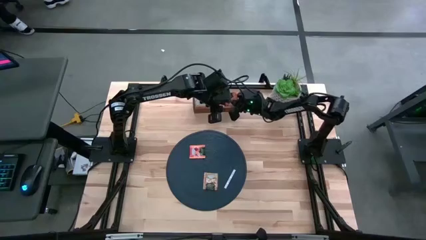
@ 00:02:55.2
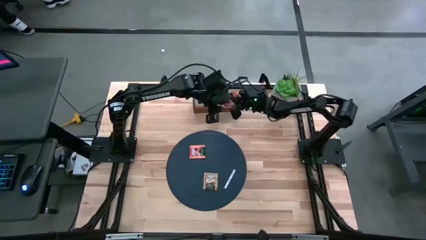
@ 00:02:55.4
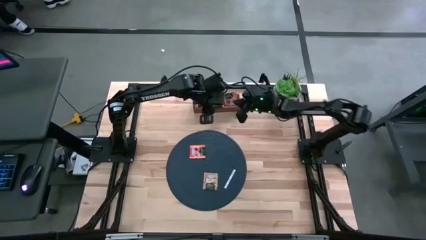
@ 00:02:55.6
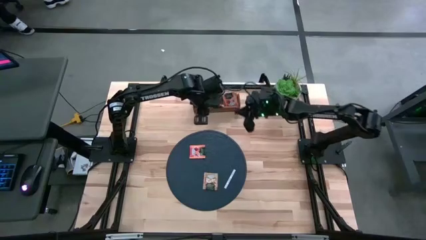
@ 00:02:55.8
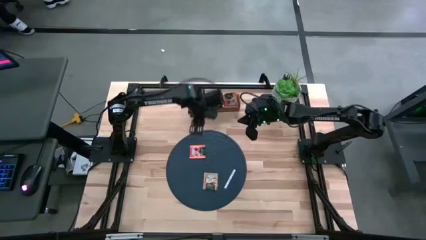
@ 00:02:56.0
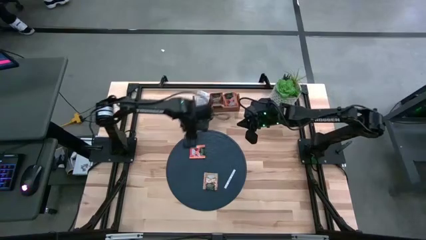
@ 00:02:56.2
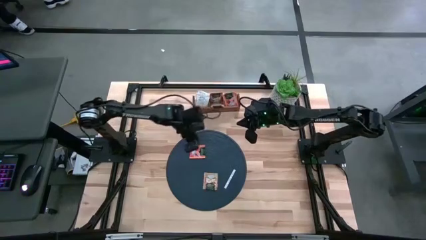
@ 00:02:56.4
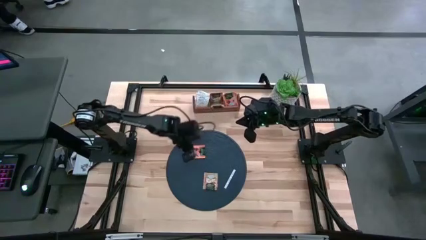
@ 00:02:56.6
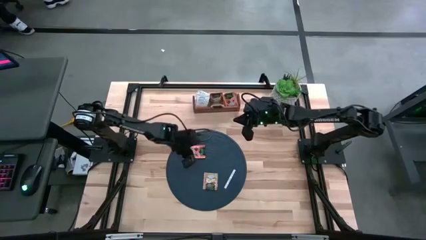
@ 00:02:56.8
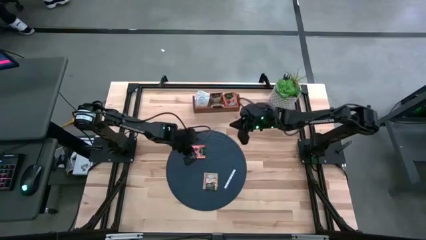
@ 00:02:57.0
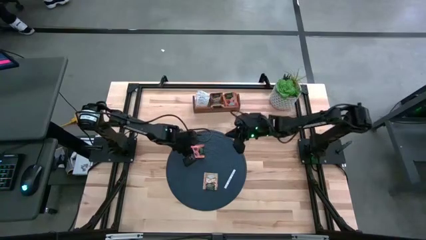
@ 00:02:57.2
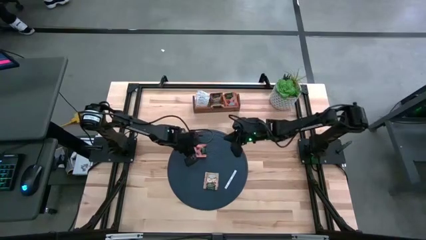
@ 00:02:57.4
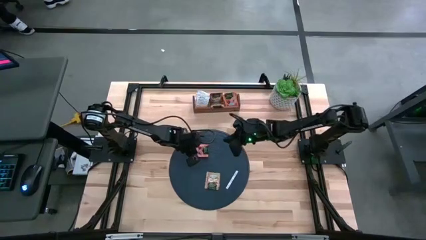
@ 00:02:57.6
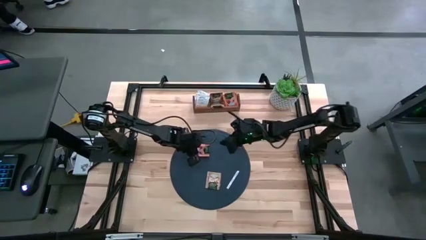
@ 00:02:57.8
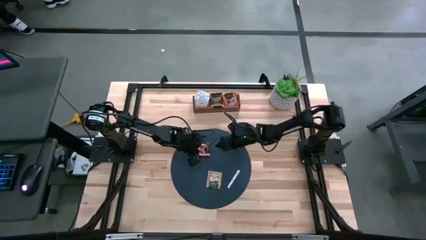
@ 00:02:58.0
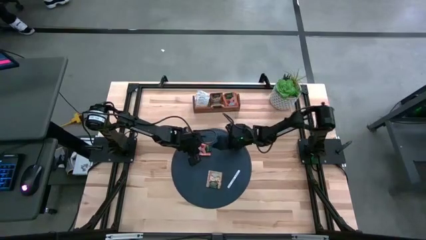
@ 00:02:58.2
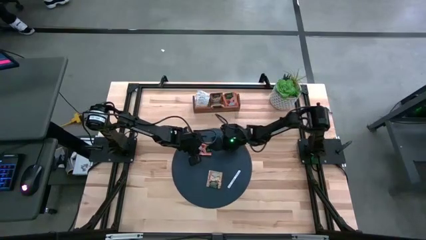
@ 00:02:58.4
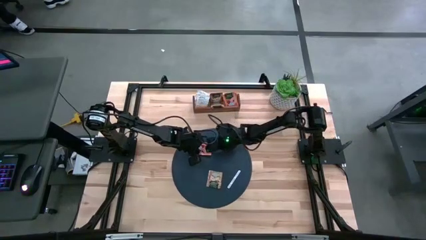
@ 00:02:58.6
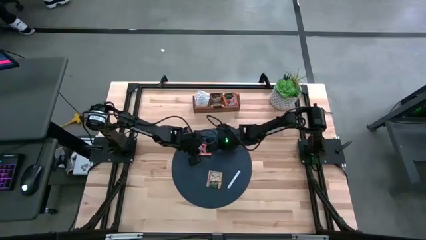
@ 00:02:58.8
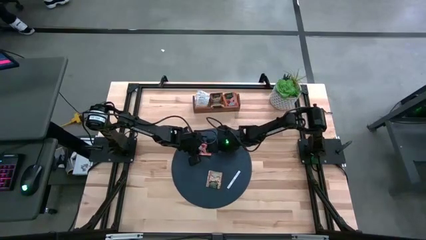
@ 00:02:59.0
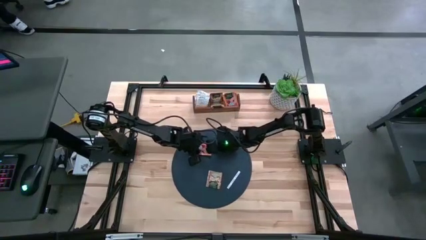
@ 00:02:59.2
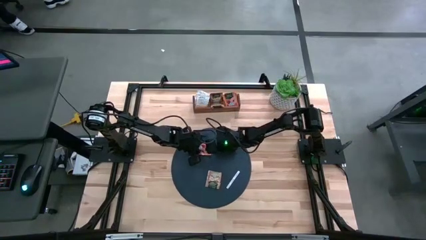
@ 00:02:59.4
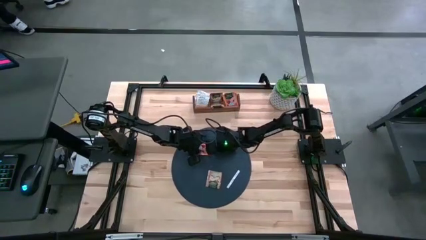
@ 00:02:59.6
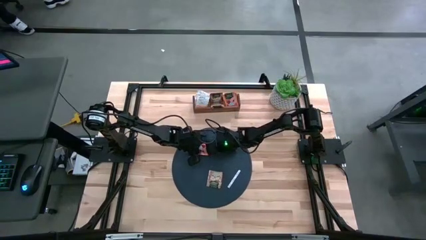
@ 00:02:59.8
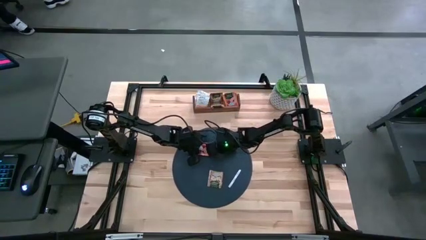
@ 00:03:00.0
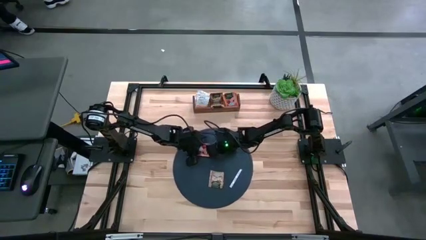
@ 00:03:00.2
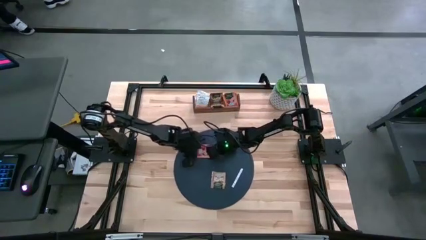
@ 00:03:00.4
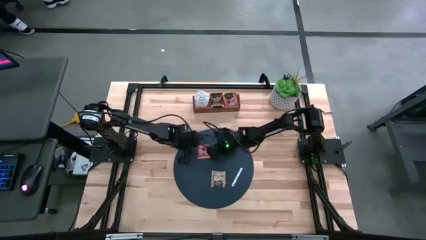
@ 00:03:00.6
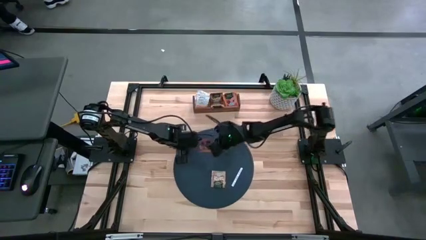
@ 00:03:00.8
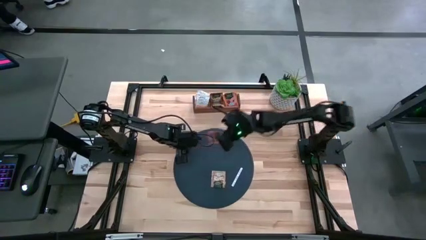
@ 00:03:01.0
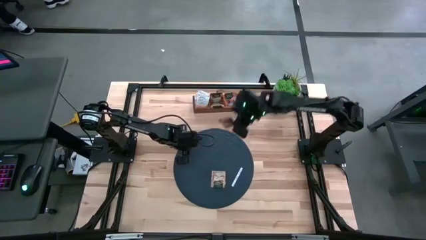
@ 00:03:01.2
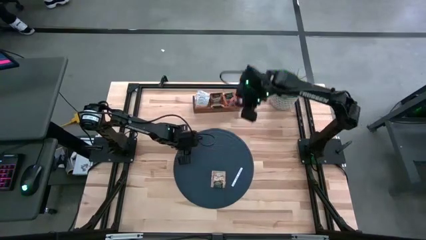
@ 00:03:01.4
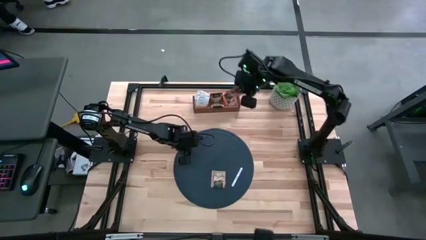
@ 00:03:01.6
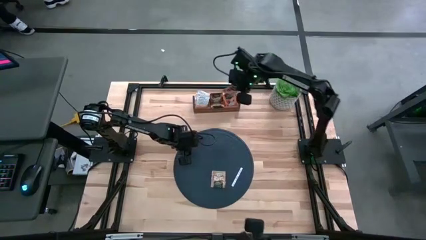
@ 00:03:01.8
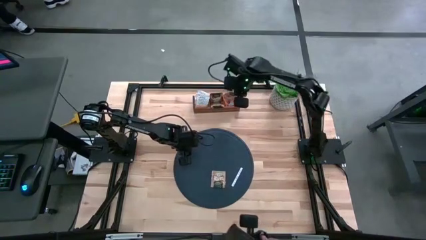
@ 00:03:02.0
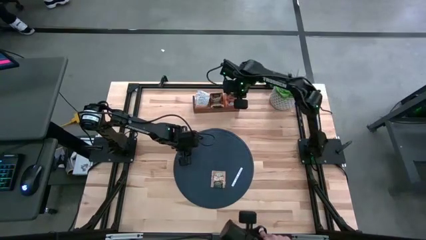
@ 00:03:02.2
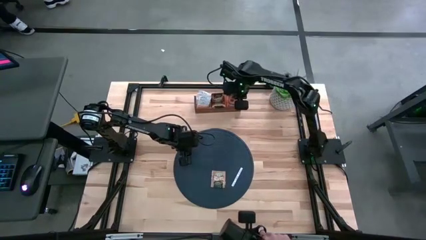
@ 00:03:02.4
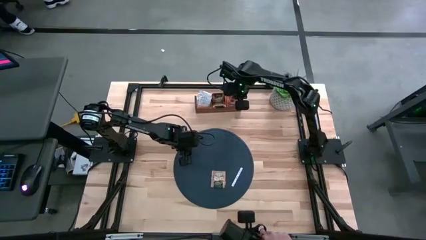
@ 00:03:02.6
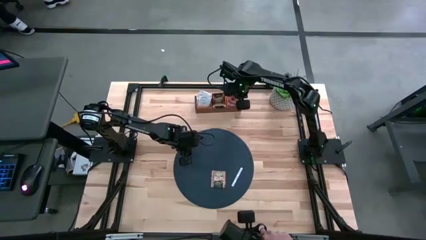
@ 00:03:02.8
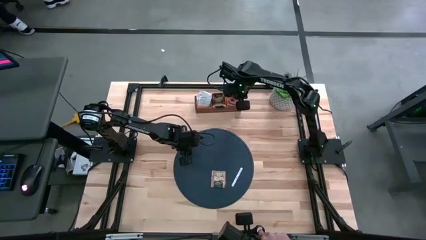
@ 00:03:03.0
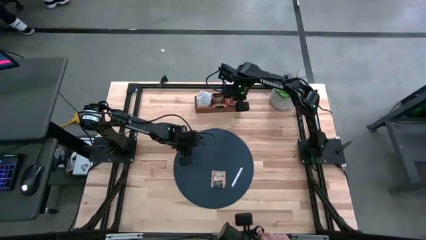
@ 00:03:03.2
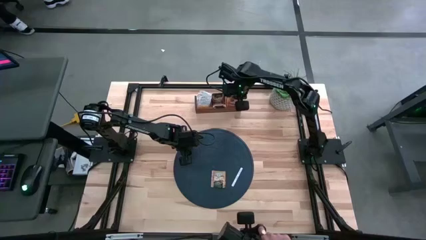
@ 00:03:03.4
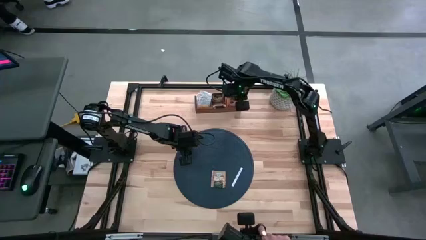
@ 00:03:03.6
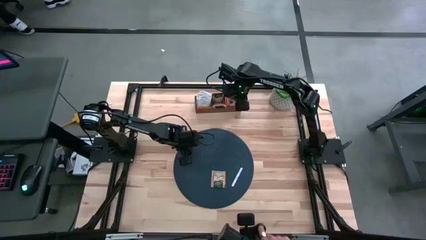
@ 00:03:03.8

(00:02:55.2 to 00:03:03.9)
Task: Pick & Place Tea
Put the orange tea bag into the right section of the wooden organizer

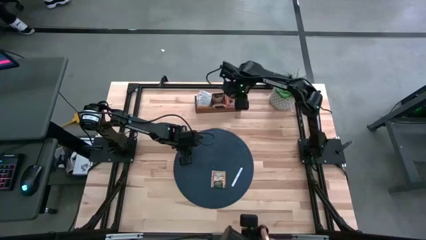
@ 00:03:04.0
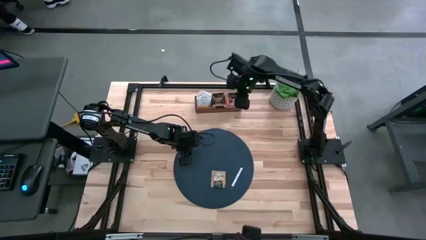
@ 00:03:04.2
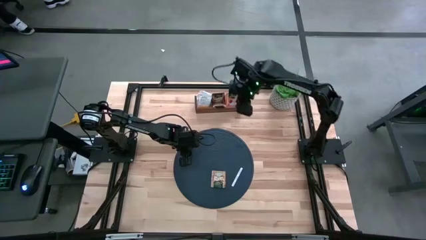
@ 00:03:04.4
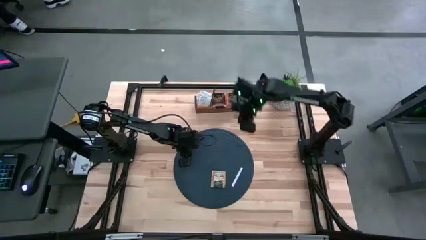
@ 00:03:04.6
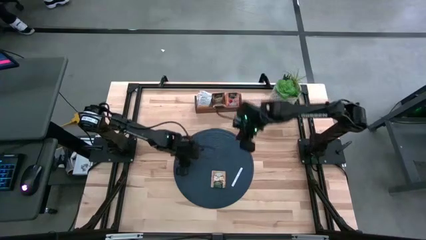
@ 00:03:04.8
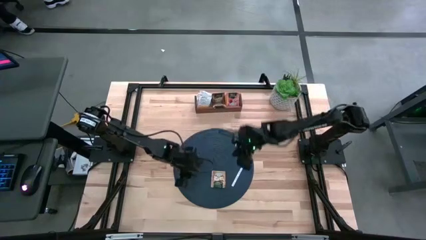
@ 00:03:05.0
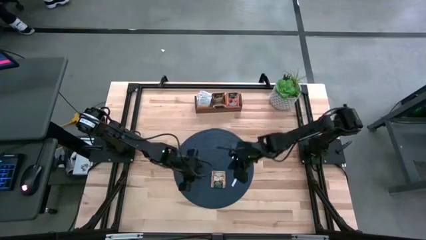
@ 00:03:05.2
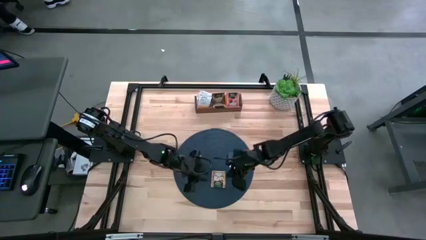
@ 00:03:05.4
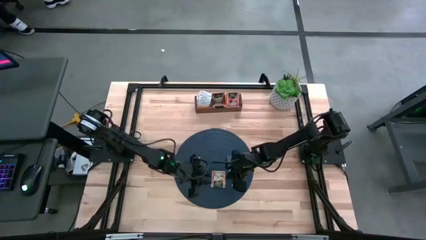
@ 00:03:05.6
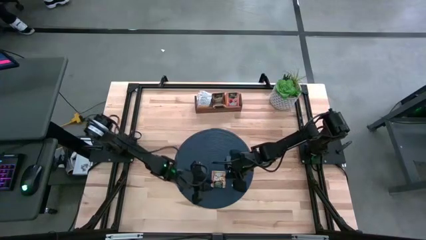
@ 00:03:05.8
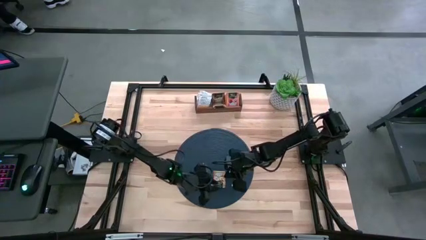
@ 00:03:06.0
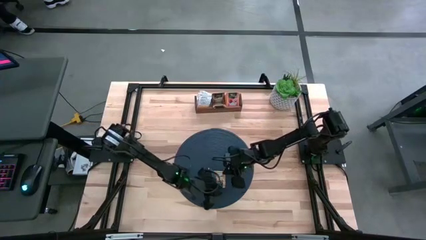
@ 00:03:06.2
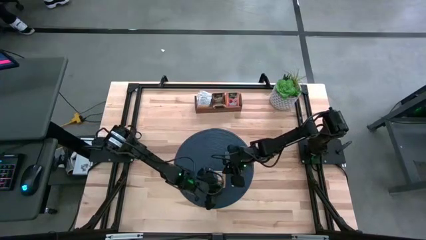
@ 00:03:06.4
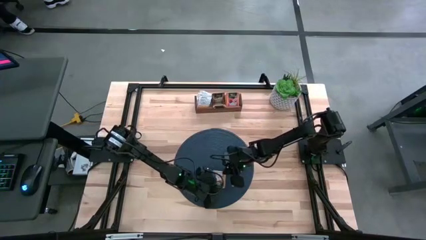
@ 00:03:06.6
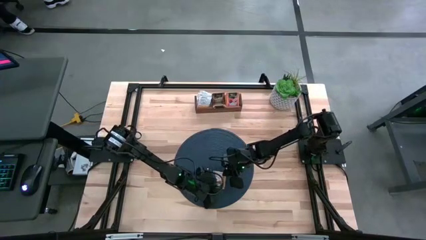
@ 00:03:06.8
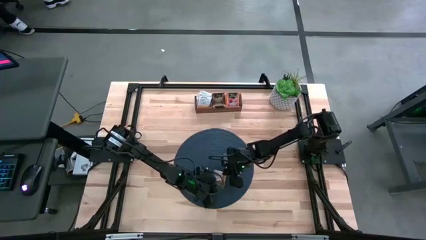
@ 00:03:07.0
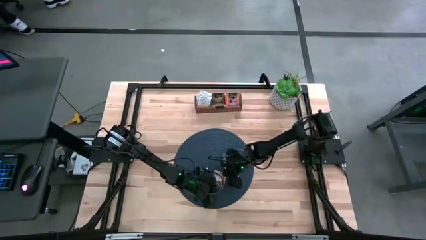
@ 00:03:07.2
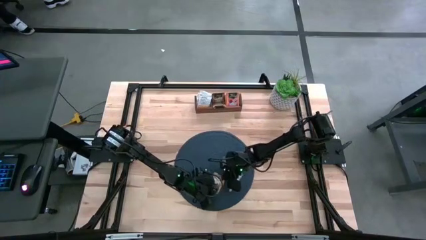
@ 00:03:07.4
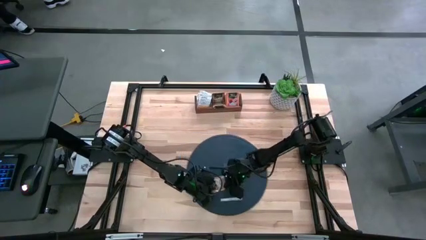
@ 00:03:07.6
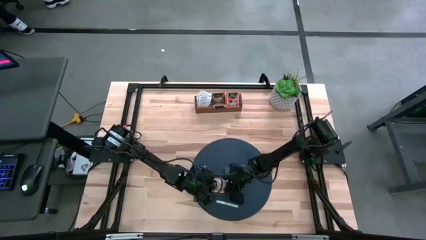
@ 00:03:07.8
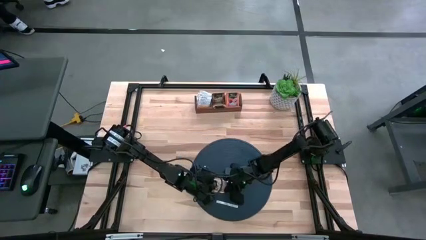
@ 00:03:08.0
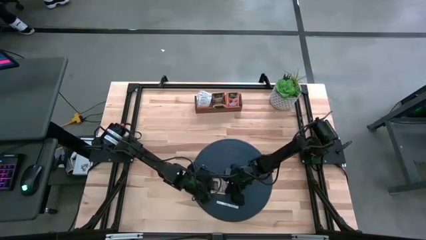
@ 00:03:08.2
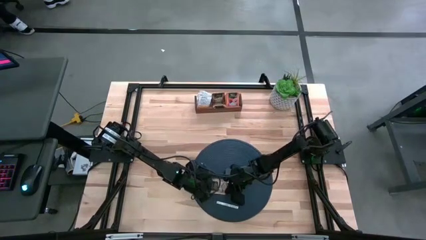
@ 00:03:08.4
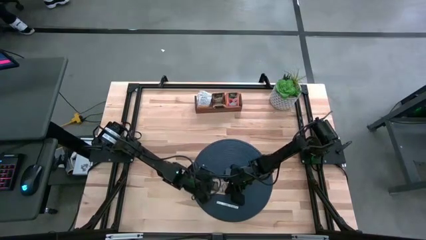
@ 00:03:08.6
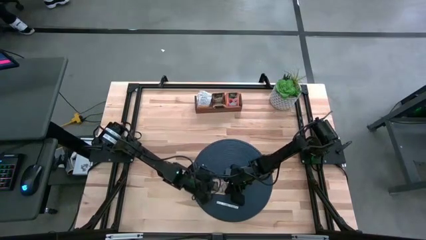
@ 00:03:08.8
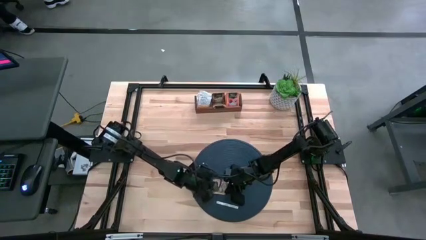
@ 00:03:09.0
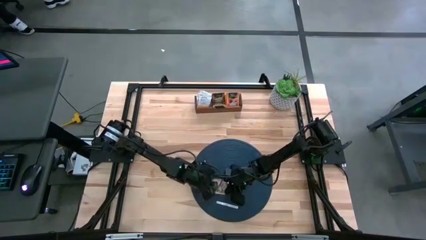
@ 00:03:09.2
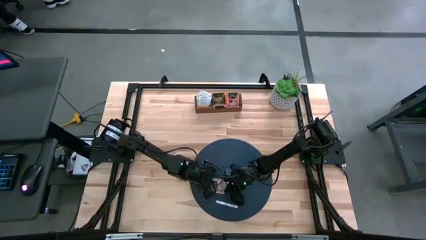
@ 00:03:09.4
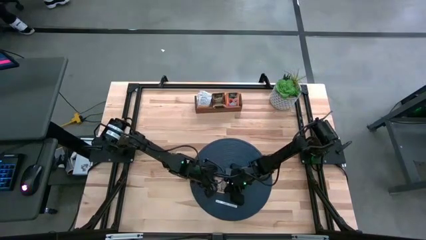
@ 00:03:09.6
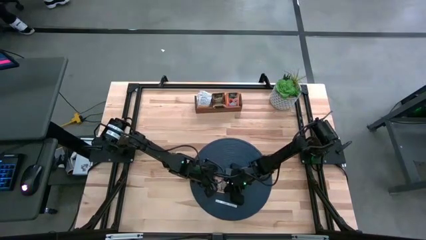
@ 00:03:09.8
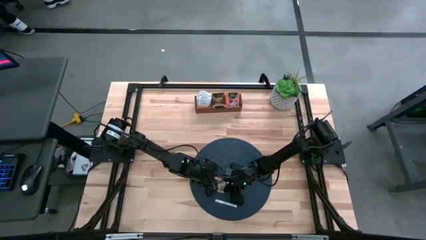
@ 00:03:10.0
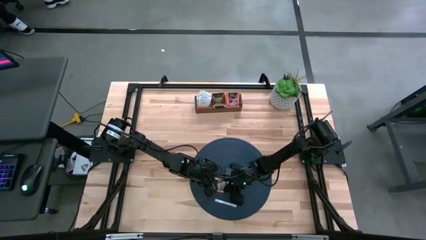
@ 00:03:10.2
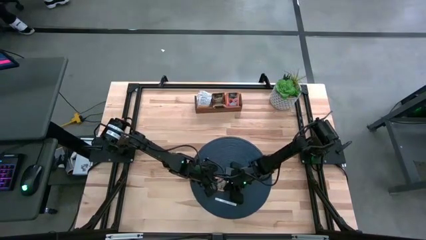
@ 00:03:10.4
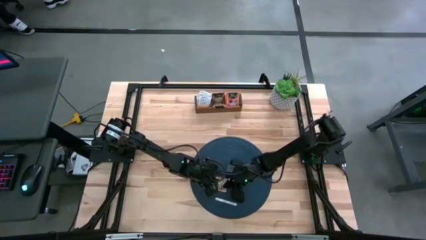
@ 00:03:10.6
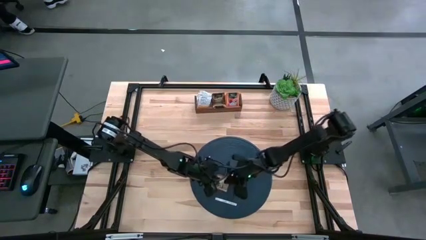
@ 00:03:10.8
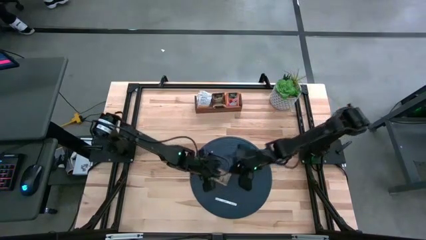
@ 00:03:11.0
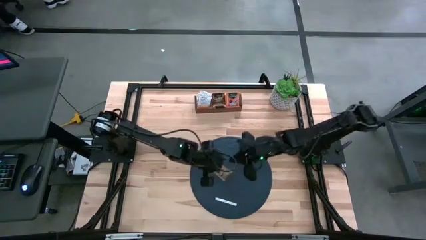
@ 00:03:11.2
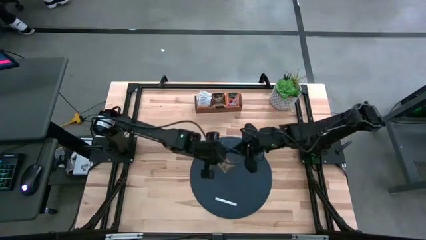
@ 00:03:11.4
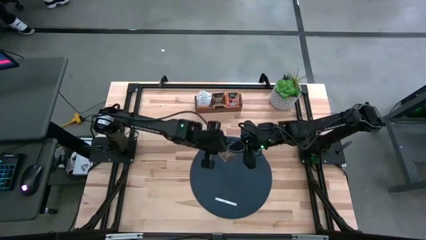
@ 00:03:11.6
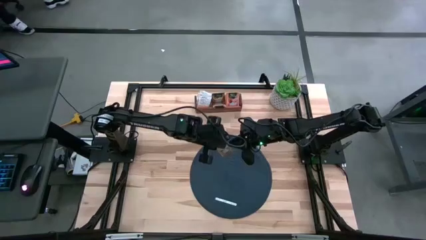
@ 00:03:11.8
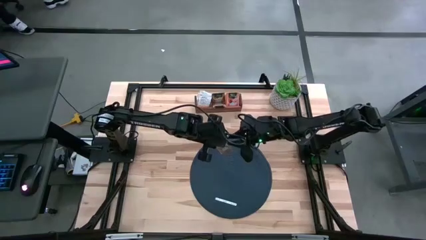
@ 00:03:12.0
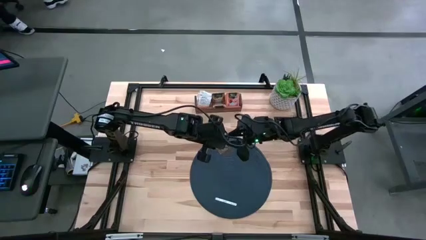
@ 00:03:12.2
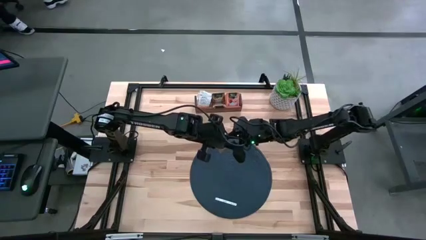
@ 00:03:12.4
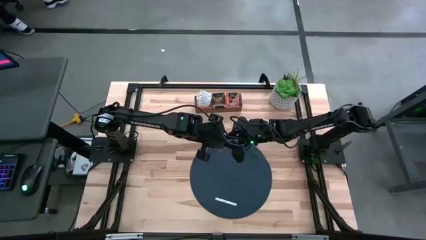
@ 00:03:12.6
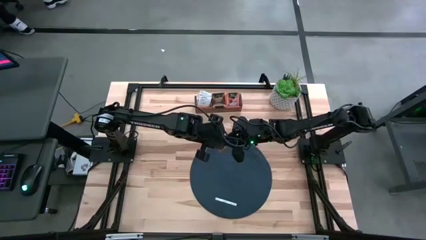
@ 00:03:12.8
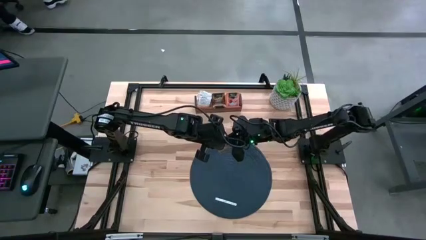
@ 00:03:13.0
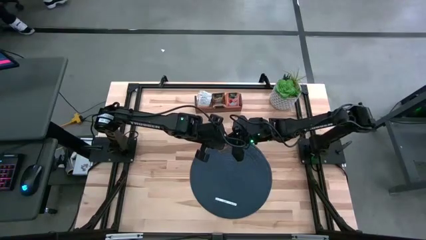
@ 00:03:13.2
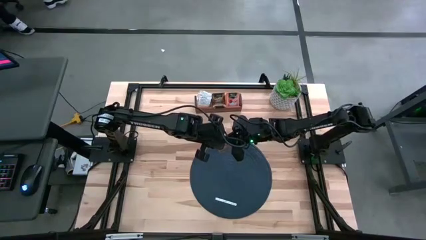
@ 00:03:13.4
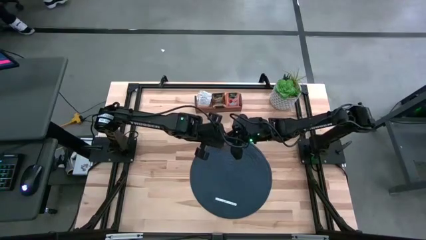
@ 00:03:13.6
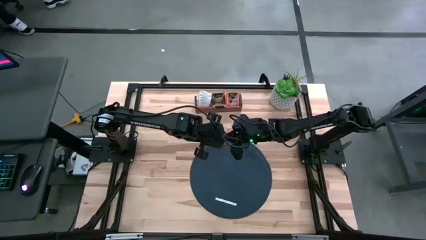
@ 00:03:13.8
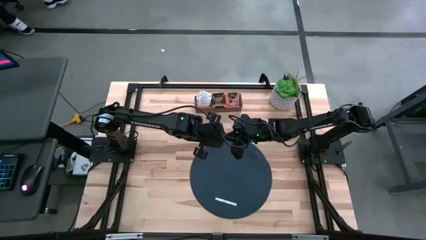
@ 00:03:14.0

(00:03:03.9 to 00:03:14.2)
Put the brown tea bag into the middle section of the wooden organizer
